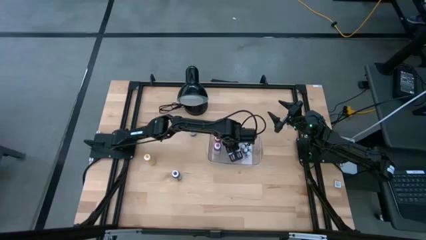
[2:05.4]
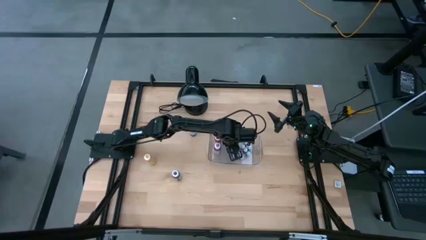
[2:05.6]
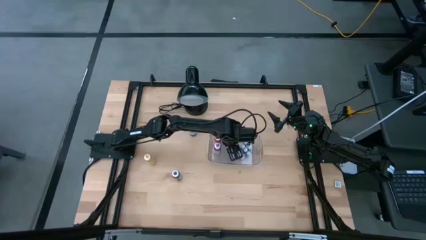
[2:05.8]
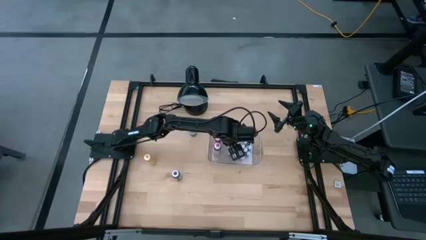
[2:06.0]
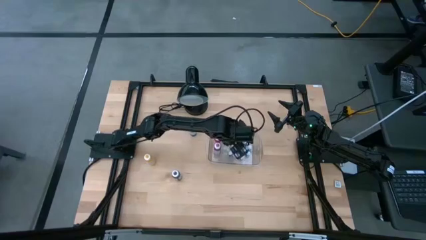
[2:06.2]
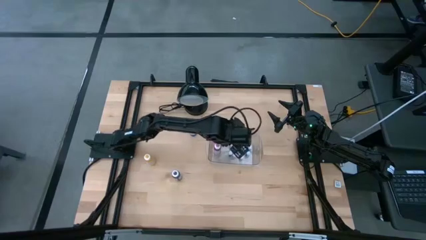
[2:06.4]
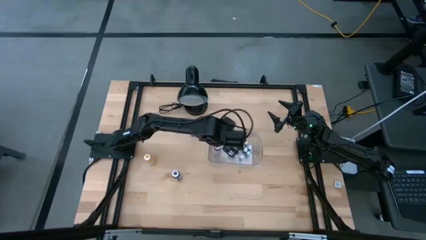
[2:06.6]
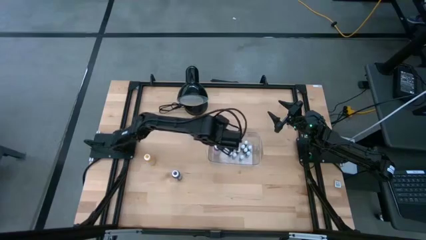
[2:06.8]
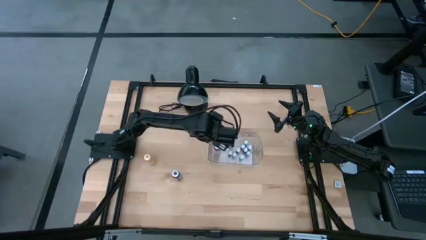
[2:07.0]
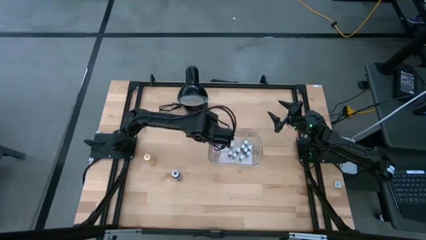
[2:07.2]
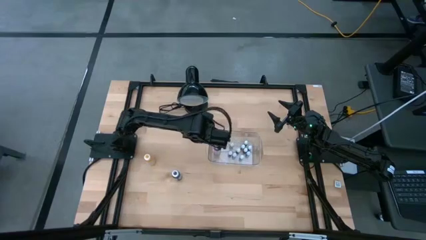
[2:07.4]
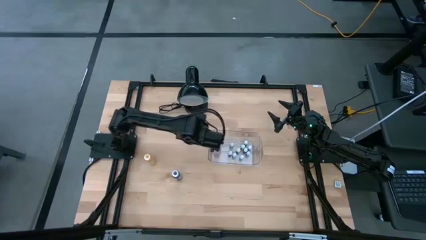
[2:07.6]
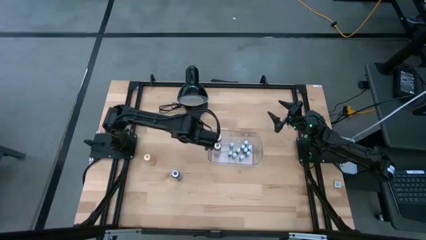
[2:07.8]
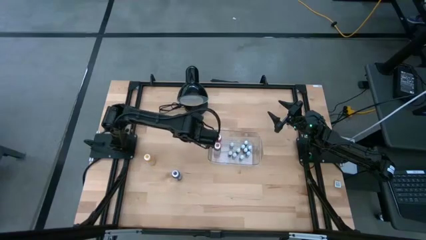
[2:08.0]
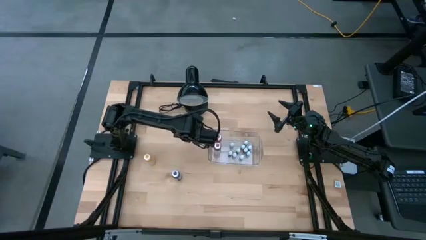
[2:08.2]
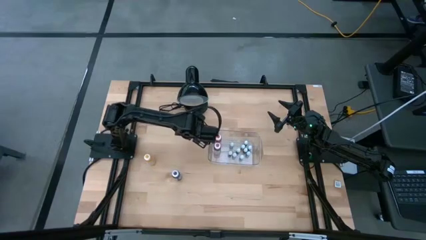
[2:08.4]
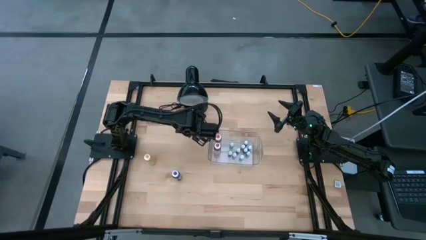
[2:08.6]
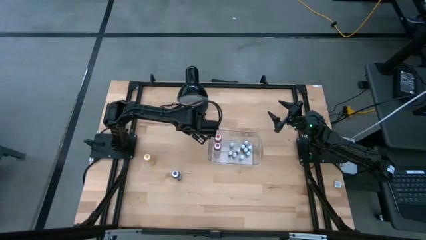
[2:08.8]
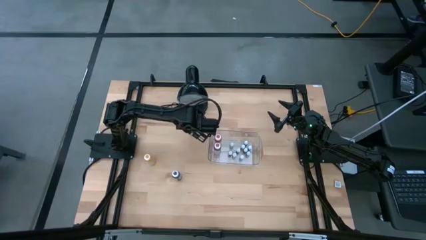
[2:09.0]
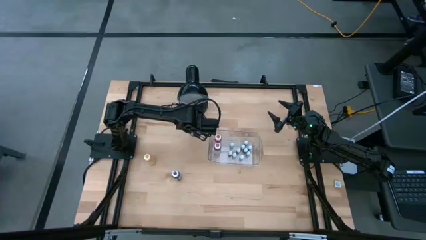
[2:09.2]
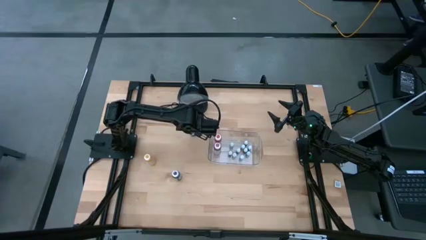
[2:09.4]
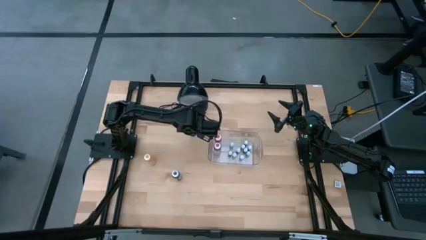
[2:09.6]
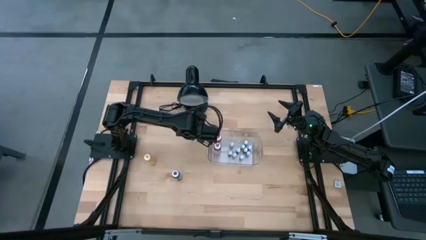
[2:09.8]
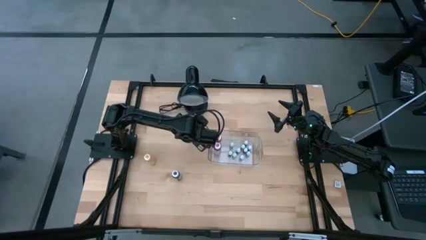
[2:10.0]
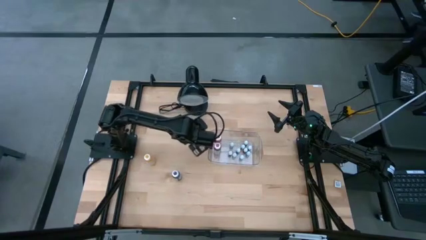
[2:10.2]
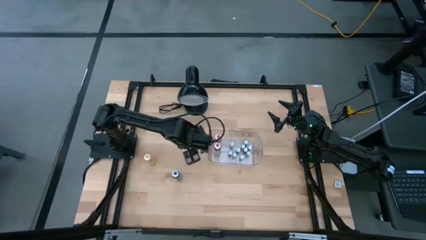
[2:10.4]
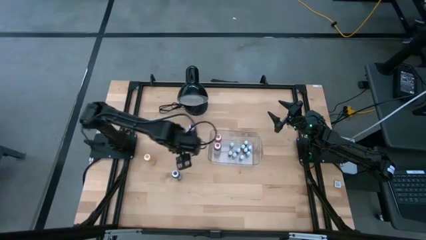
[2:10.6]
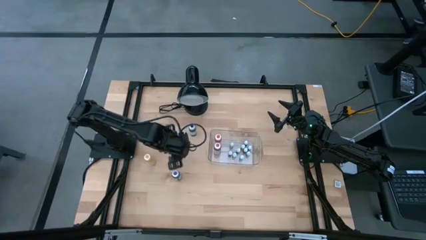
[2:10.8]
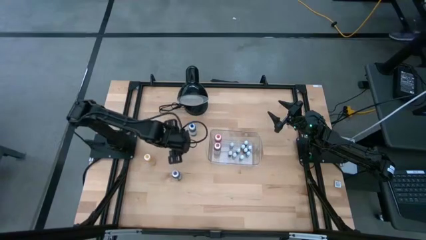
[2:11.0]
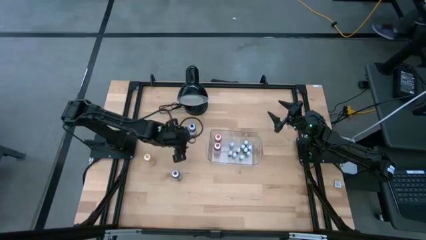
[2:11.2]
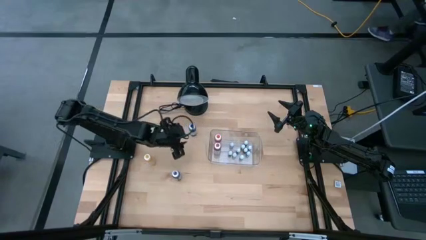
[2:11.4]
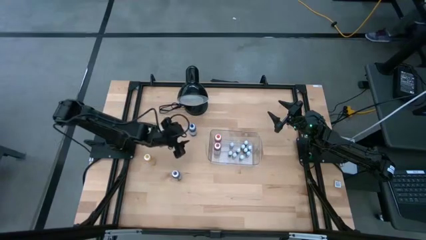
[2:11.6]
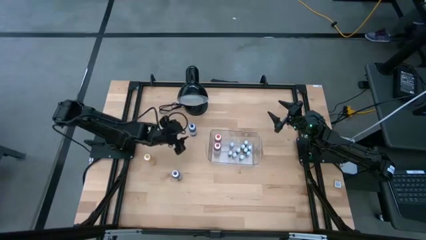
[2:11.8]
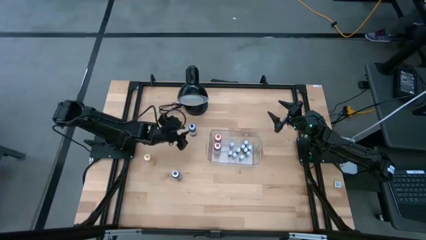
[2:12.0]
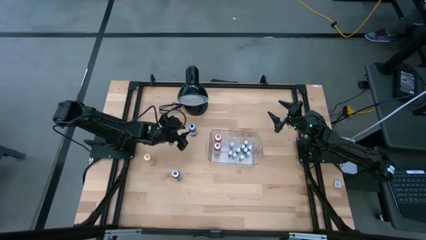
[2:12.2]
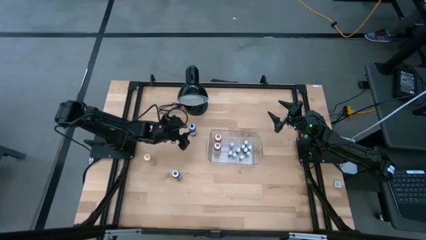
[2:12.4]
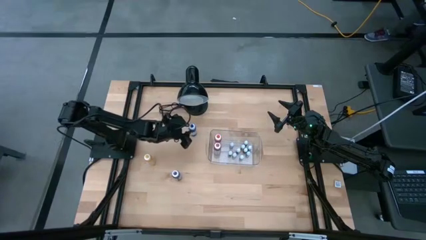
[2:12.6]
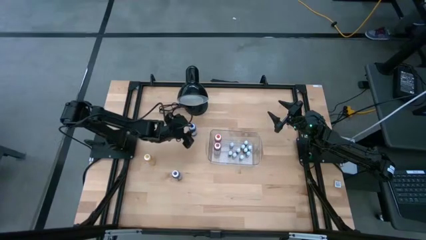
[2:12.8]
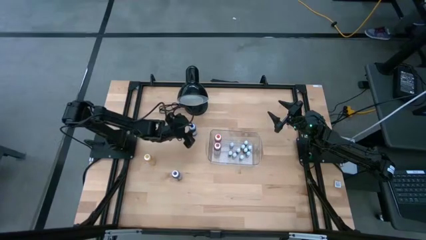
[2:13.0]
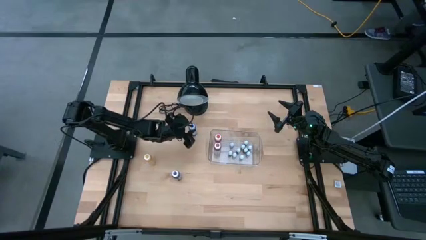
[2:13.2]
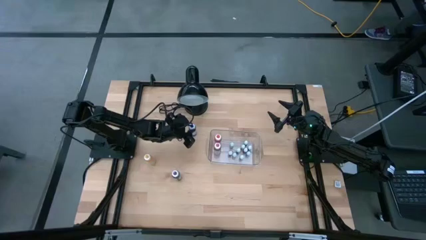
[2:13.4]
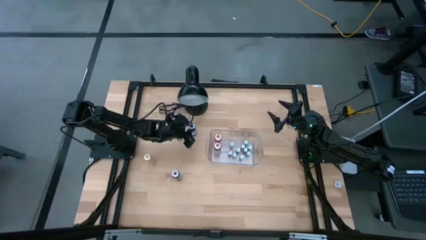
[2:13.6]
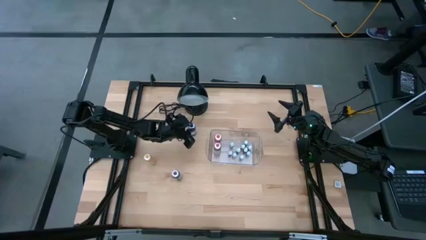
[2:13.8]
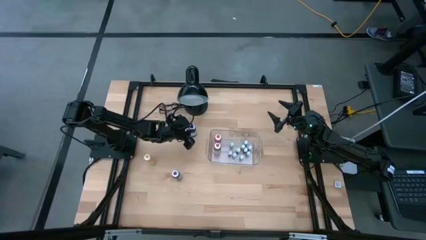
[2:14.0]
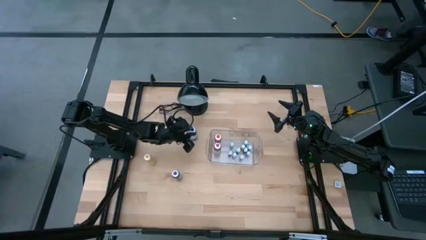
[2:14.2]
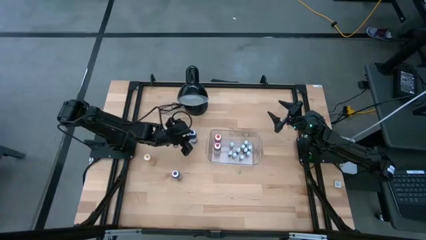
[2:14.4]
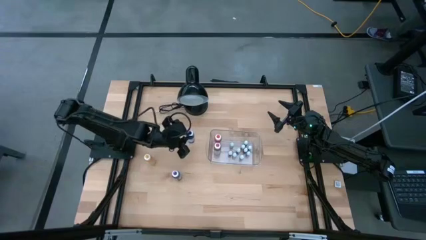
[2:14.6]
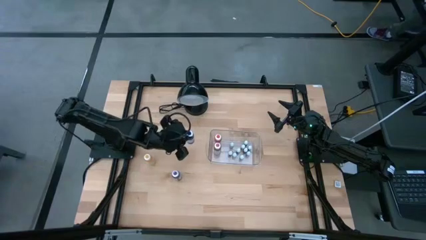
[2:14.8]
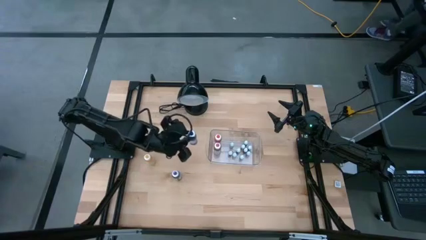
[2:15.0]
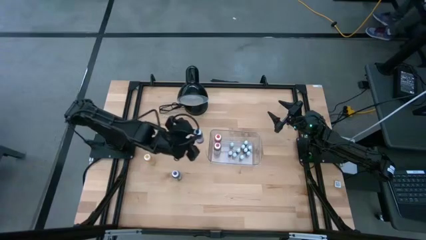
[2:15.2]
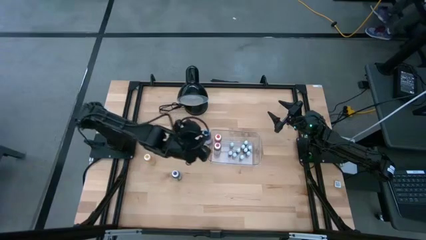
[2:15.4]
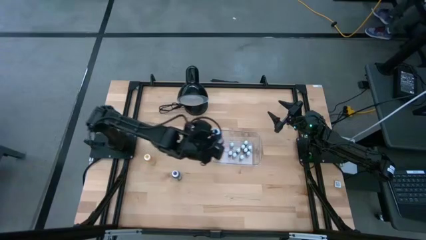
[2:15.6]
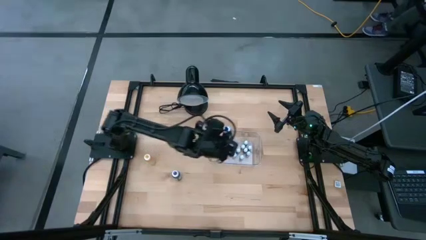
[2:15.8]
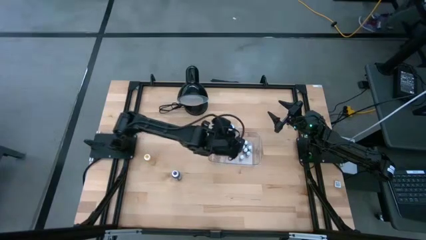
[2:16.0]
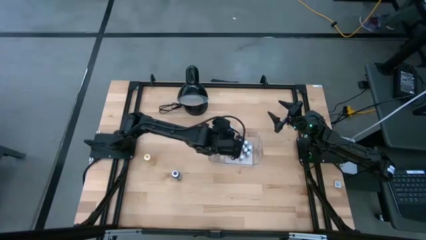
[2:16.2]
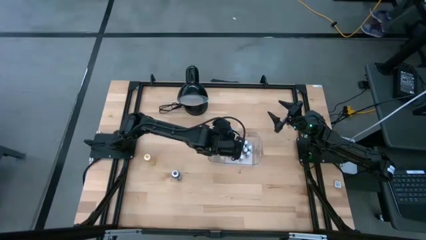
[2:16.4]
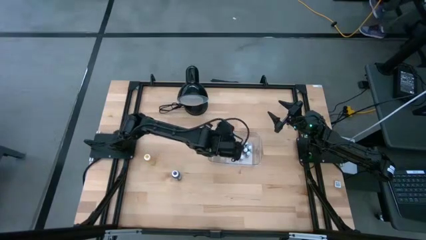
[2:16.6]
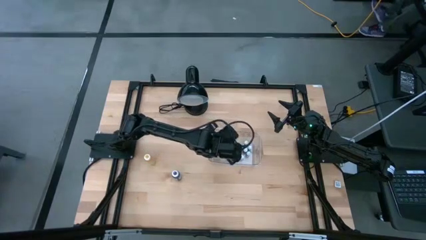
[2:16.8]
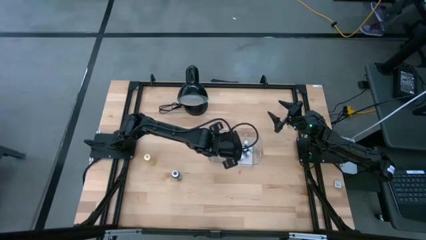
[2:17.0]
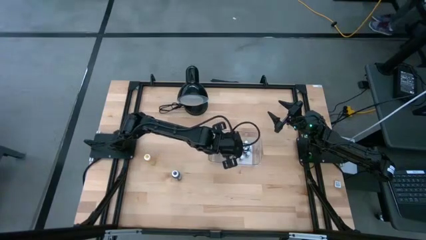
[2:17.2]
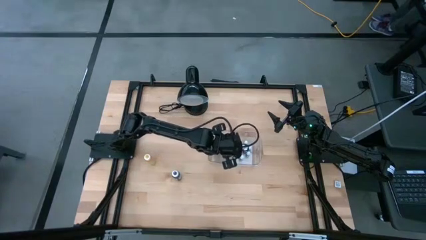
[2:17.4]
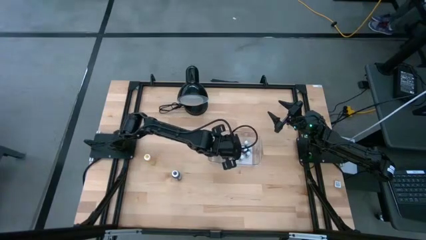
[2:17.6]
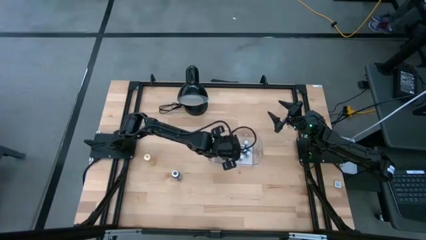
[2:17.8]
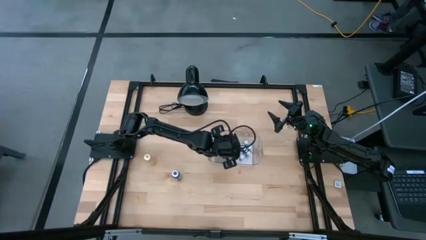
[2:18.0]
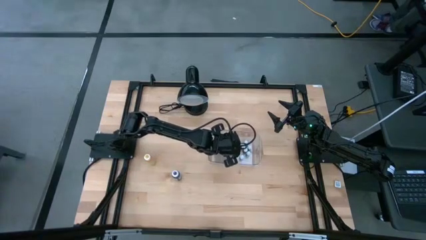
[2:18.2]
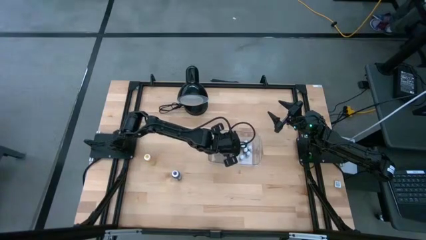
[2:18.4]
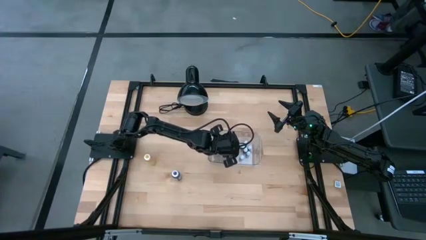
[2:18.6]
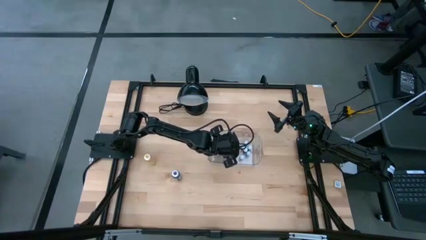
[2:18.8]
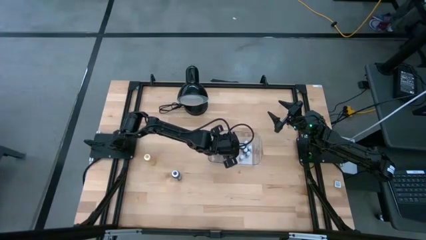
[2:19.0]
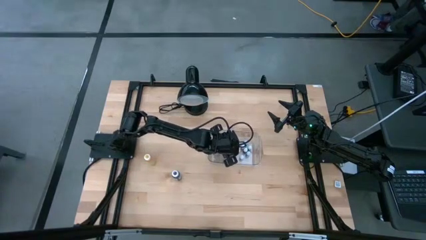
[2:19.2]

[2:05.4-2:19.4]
Task: Pick & Place food coloring
Put the big blue food coloring bottle into the transparent bin
